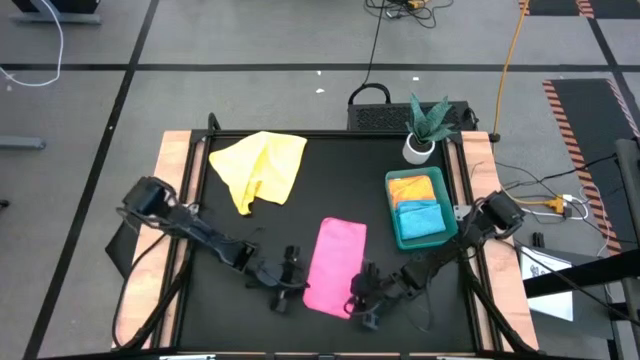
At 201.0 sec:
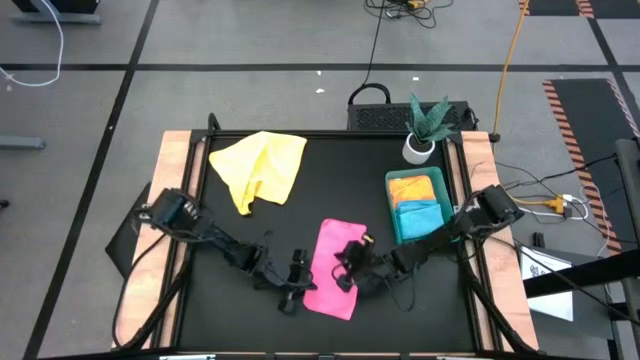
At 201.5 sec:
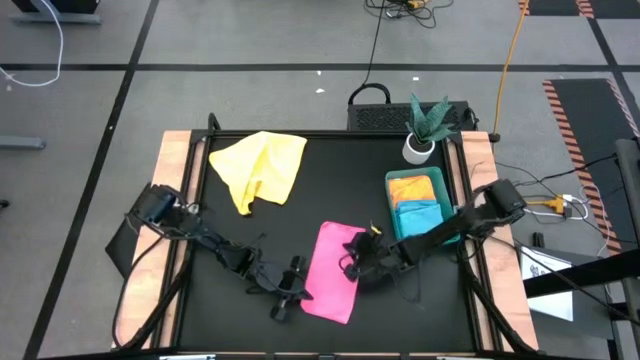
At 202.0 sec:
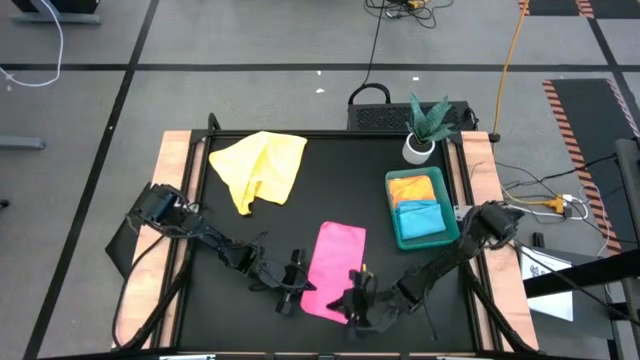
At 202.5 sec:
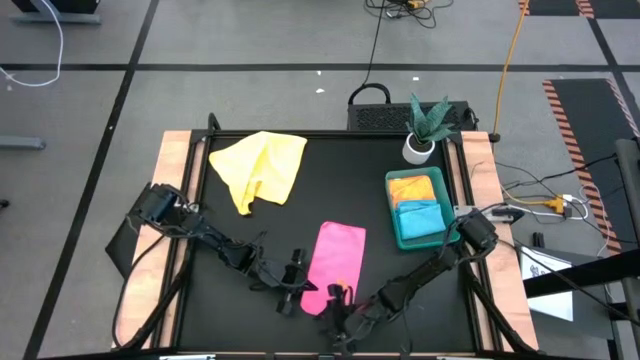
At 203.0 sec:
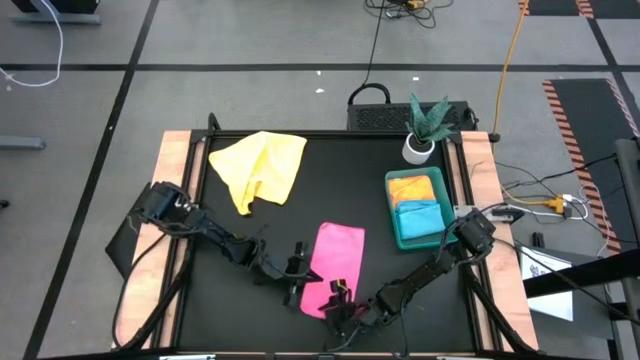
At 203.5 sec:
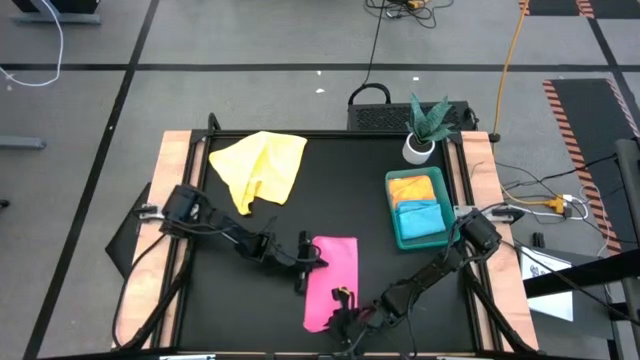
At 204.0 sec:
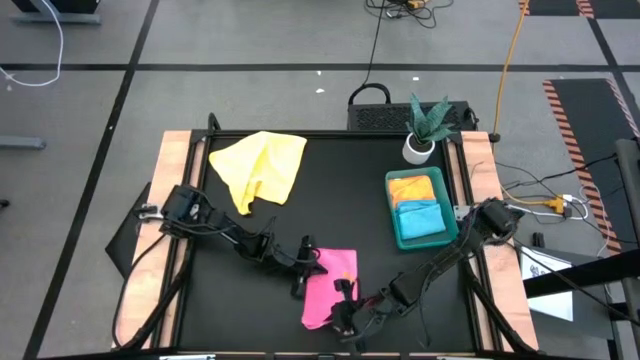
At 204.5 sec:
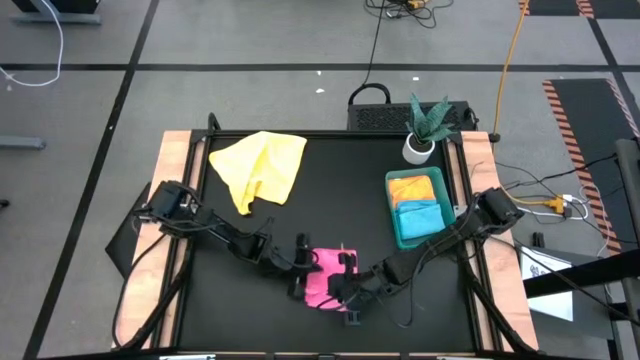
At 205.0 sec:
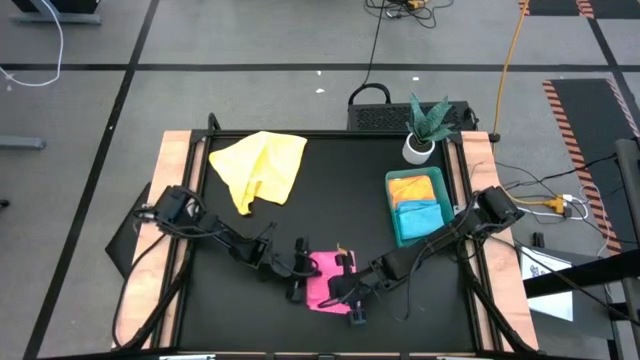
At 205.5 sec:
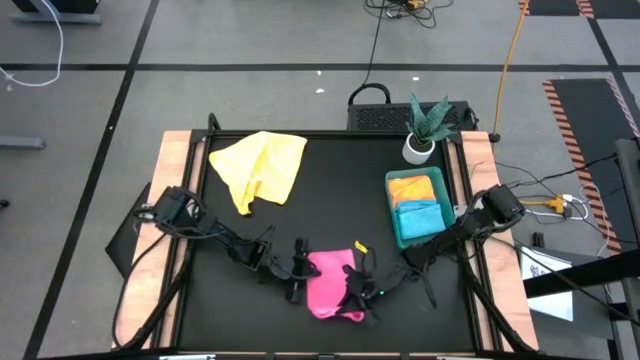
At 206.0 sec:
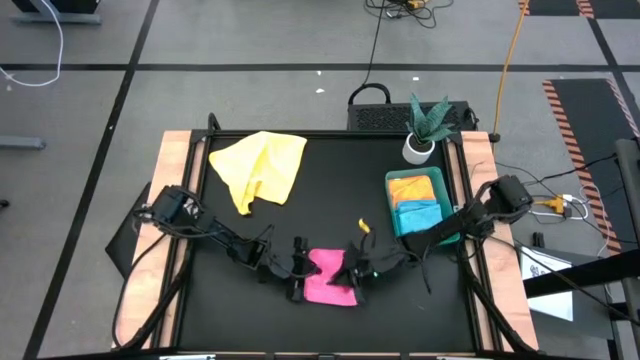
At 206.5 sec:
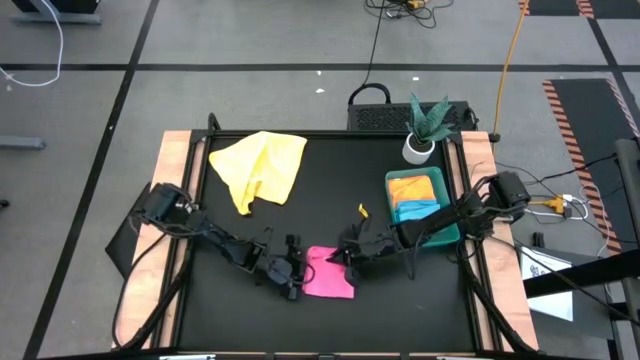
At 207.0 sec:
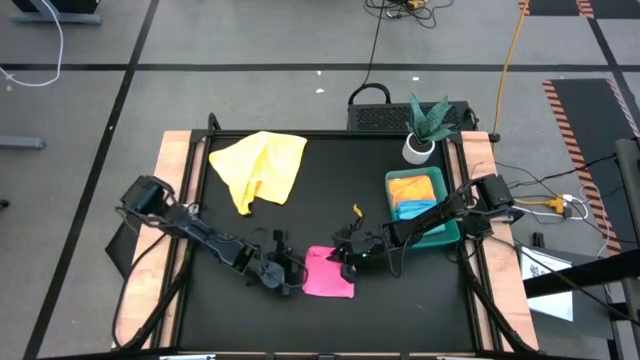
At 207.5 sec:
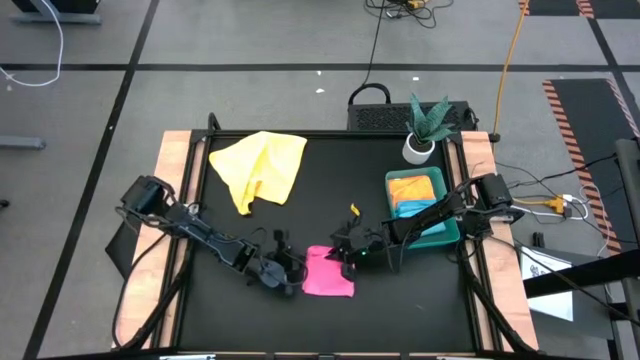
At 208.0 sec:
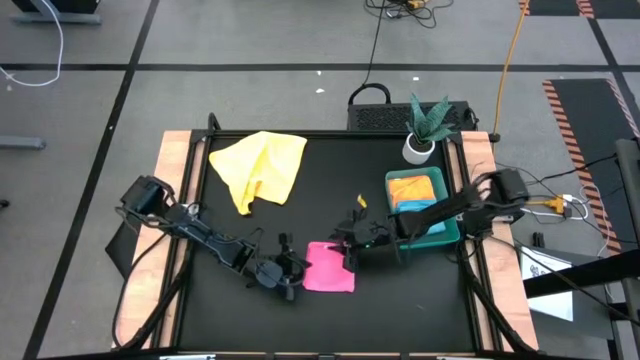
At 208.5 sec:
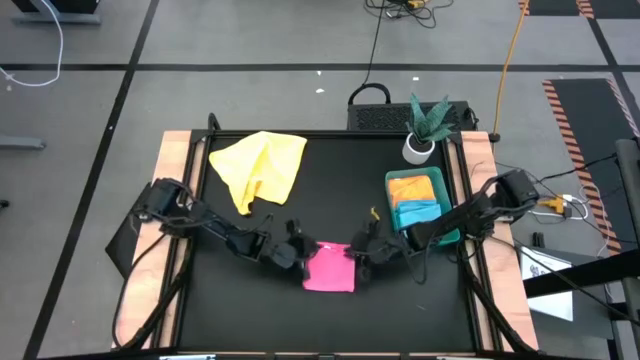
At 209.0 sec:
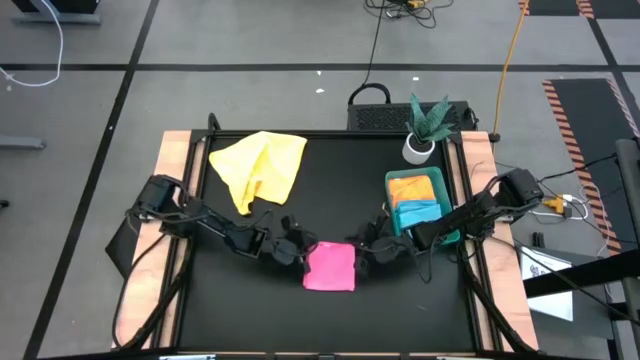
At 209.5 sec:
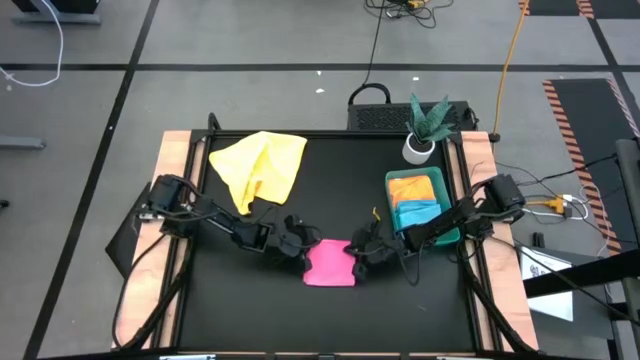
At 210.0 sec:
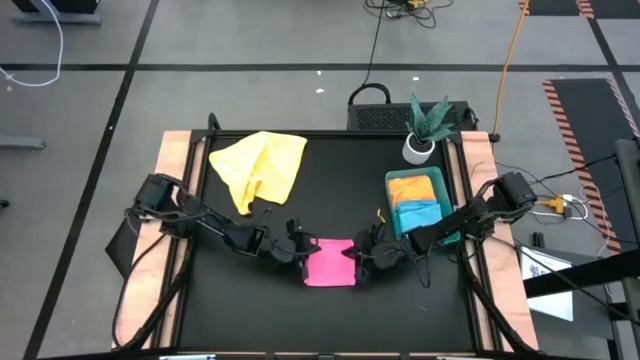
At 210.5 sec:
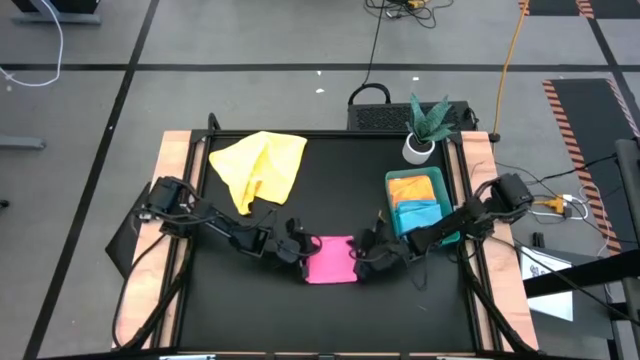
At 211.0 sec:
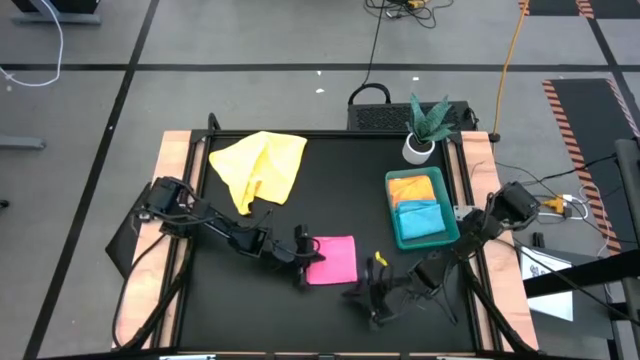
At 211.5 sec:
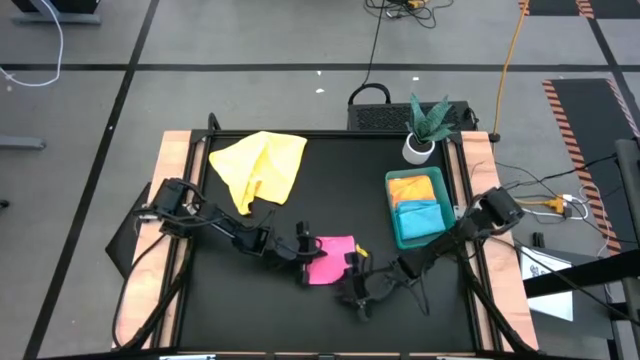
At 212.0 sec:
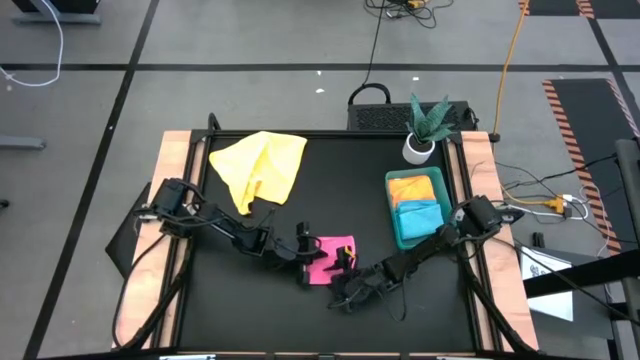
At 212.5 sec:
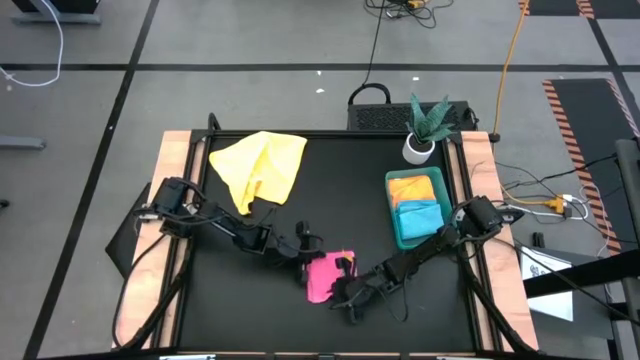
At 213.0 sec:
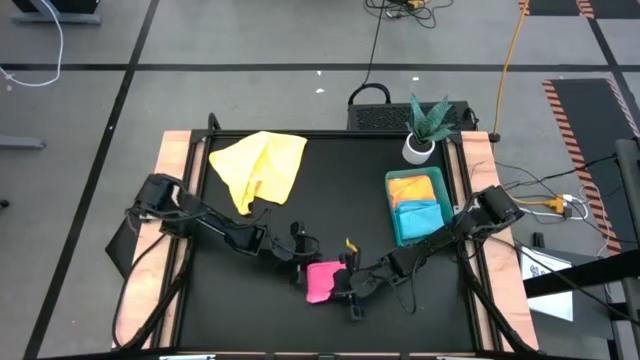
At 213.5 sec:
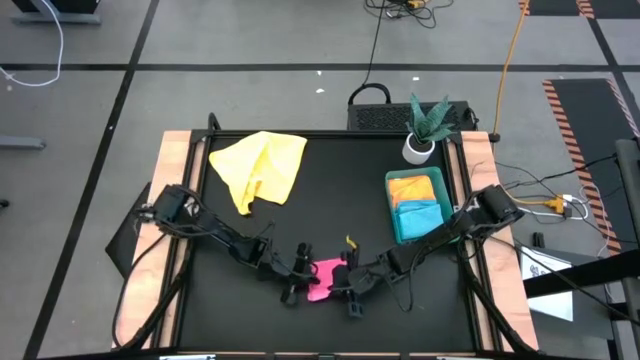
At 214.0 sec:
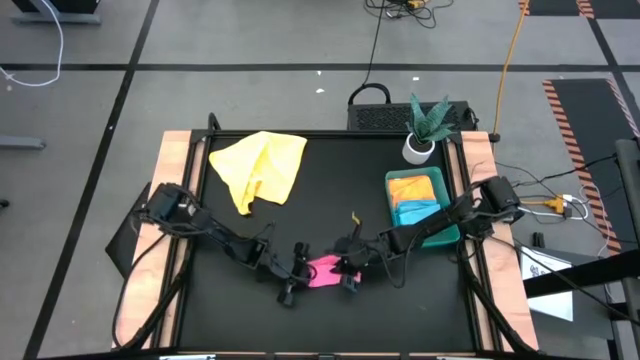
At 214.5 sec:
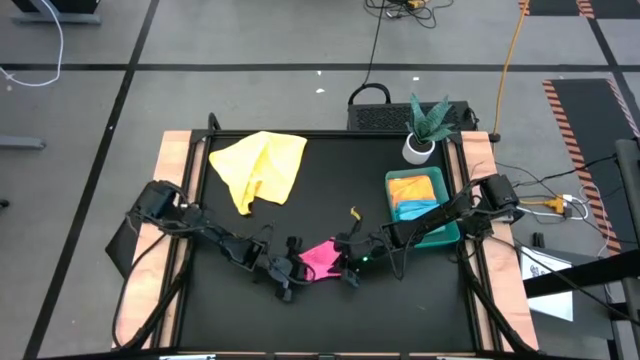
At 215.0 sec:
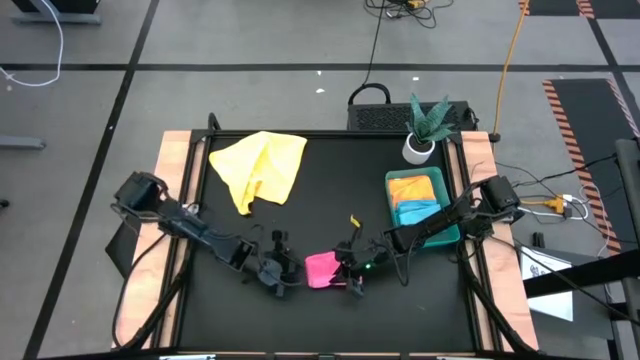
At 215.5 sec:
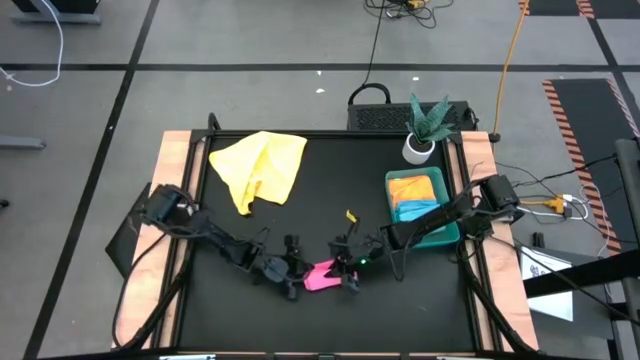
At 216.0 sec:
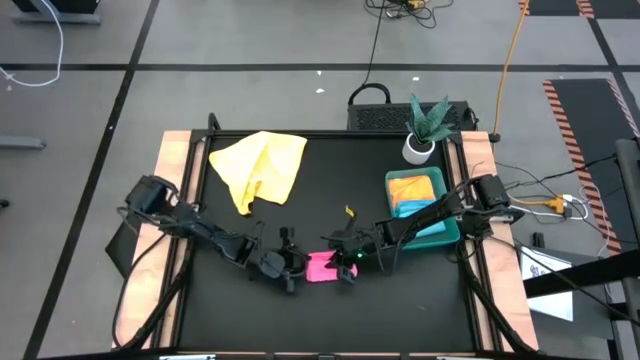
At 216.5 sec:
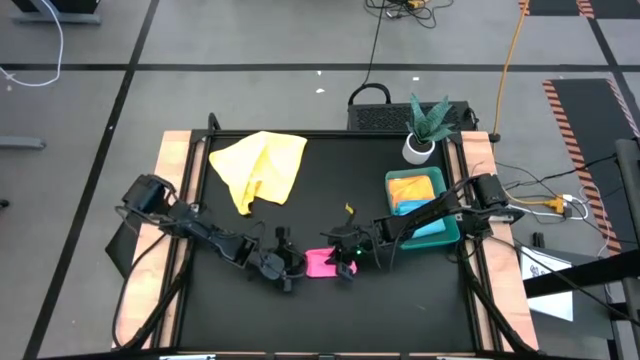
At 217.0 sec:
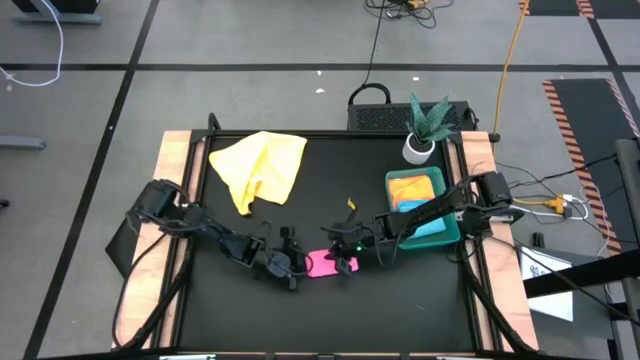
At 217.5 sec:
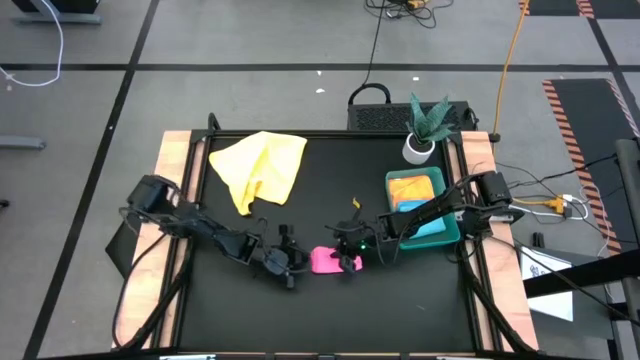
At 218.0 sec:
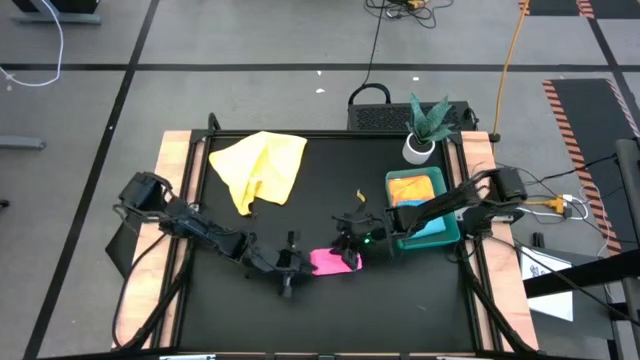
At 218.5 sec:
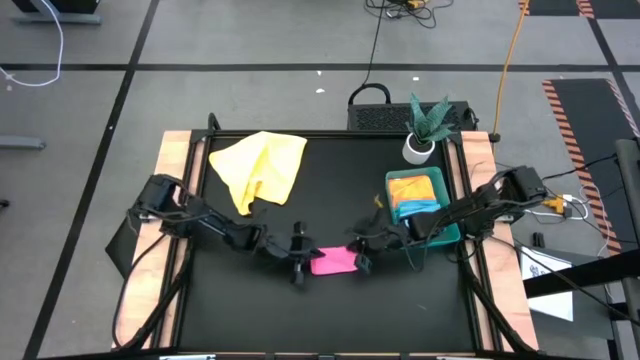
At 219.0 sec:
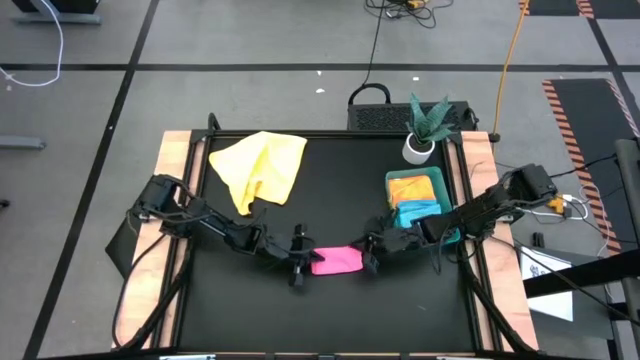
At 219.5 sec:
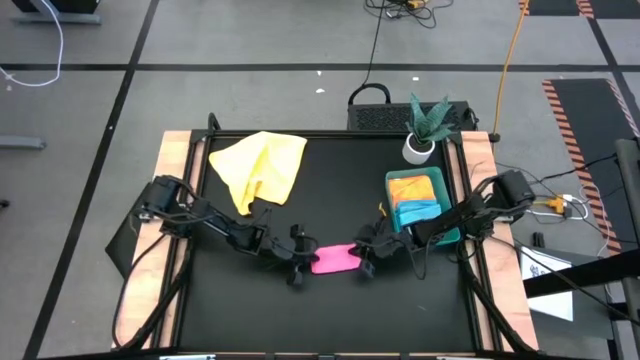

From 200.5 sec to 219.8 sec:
Task: Fold microfiber towels
Fold the pink microfiber cloth

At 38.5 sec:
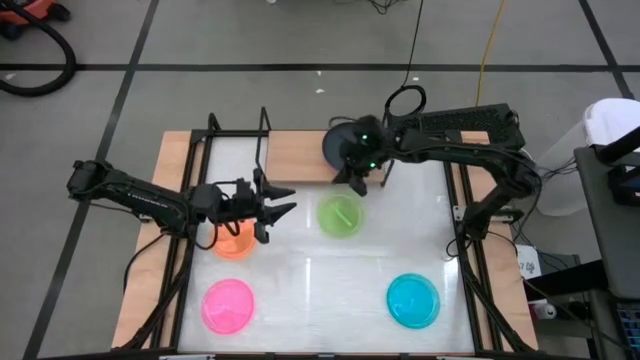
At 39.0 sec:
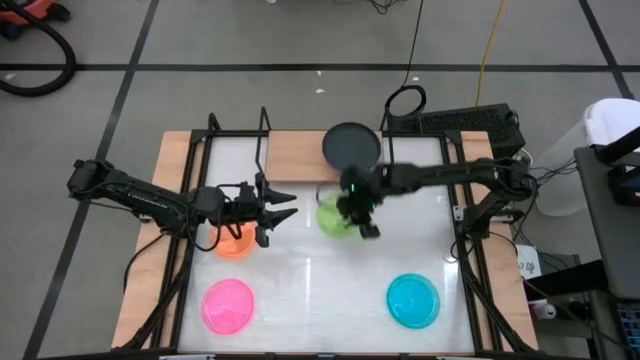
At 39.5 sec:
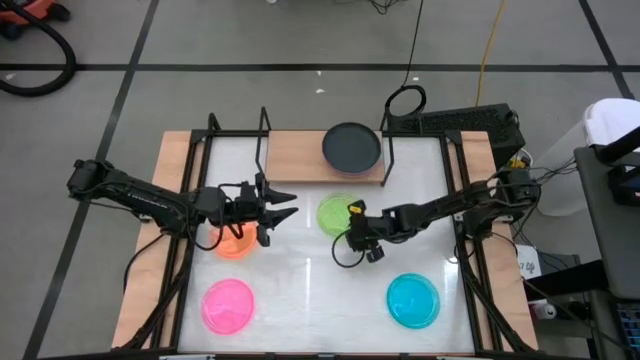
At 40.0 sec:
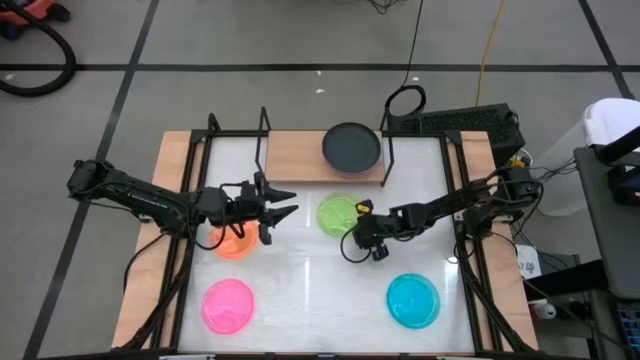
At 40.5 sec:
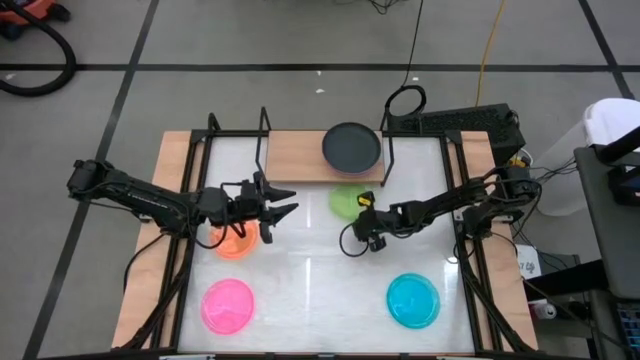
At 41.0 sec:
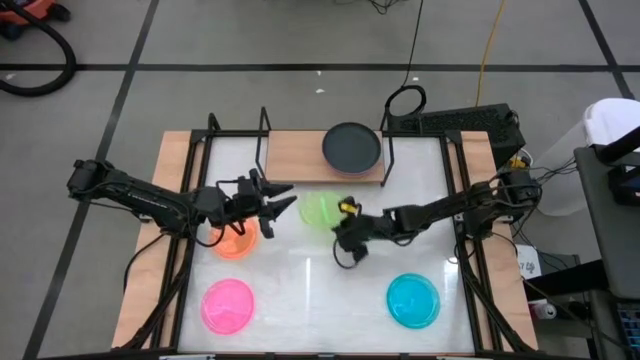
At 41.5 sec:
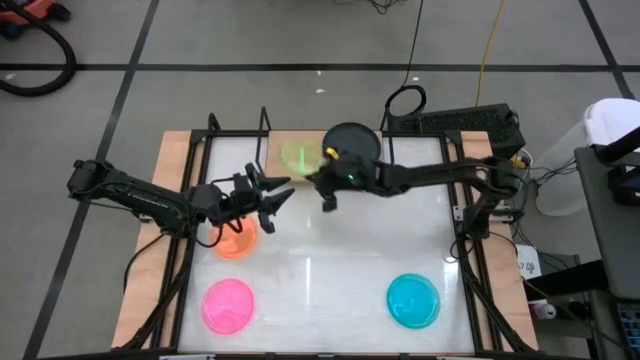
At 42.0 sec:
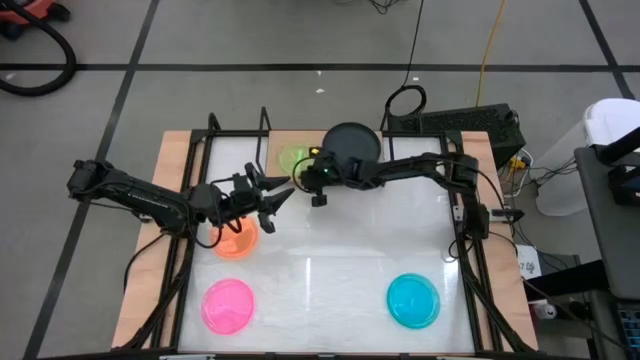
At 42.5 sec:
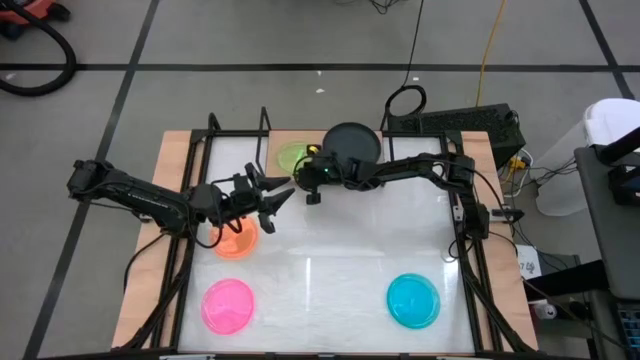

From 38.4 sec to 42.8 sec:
Task: Place and stack plates onto a shelf
Put the light green plate on the shelf
